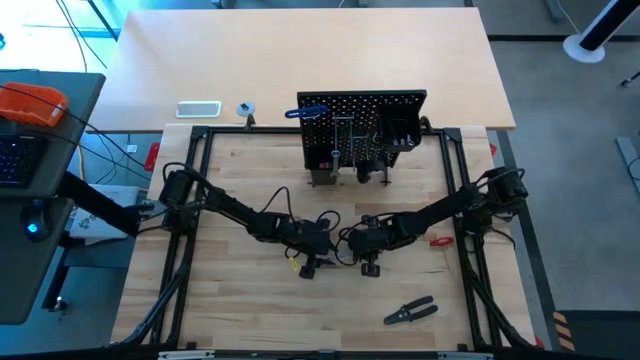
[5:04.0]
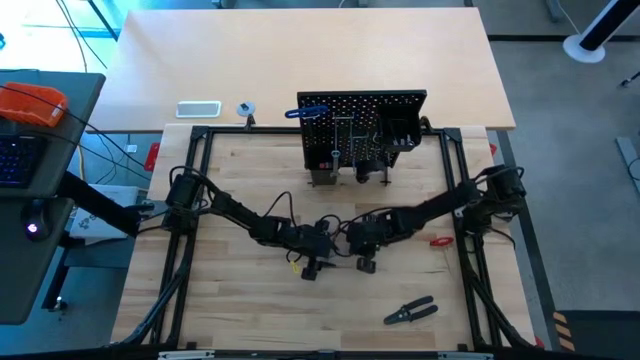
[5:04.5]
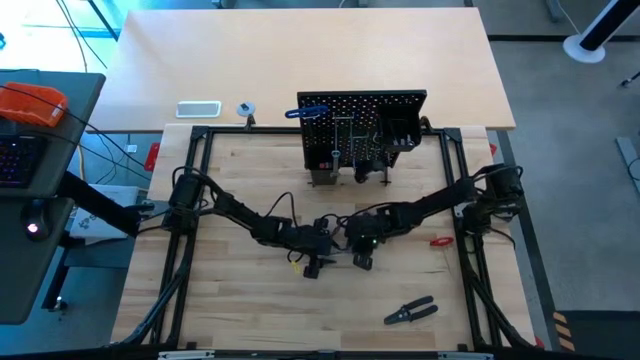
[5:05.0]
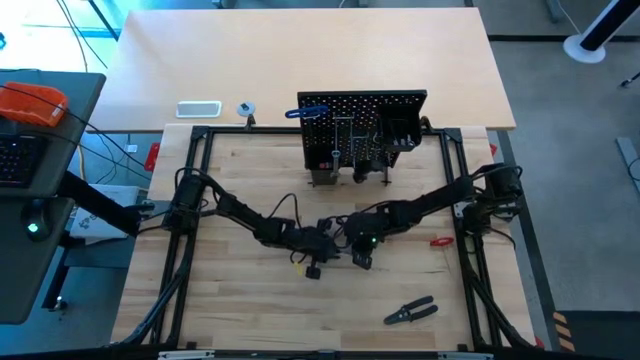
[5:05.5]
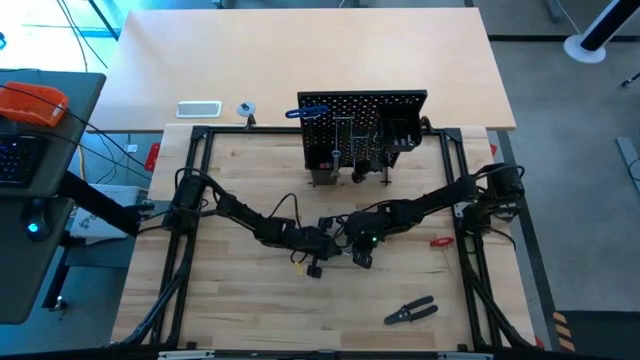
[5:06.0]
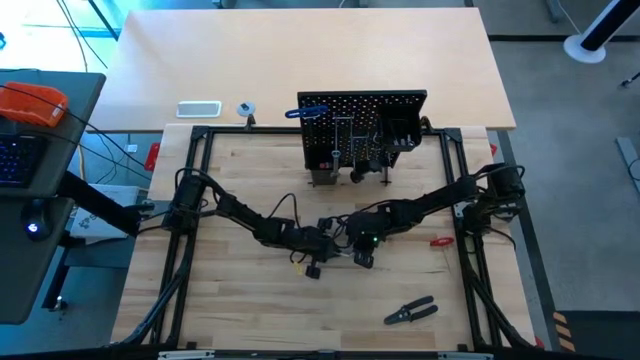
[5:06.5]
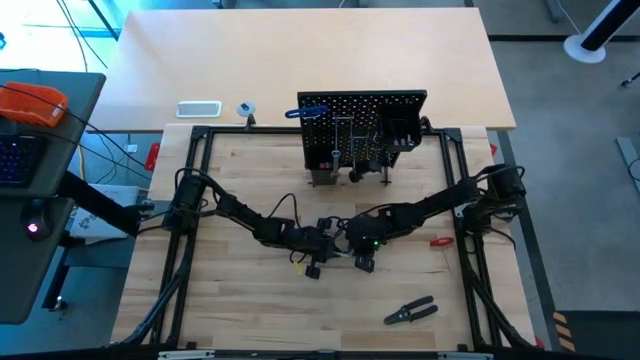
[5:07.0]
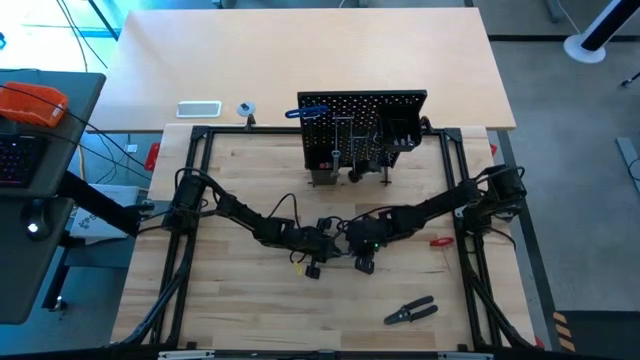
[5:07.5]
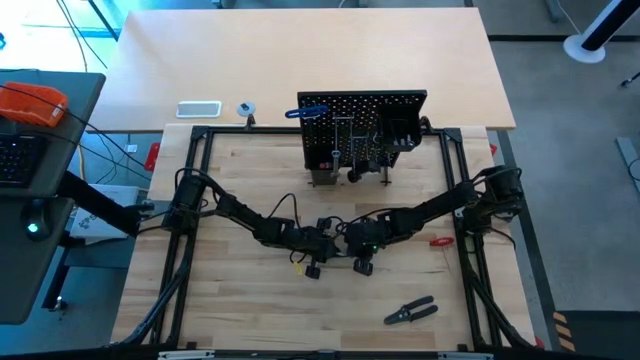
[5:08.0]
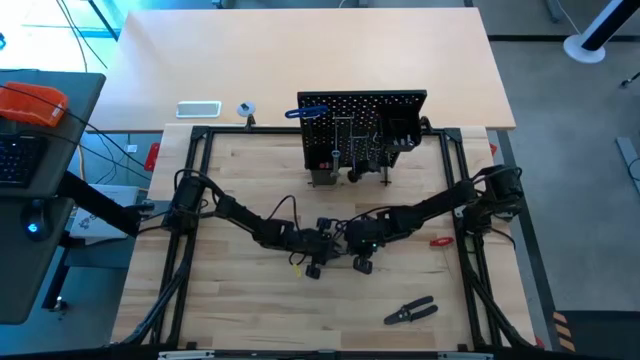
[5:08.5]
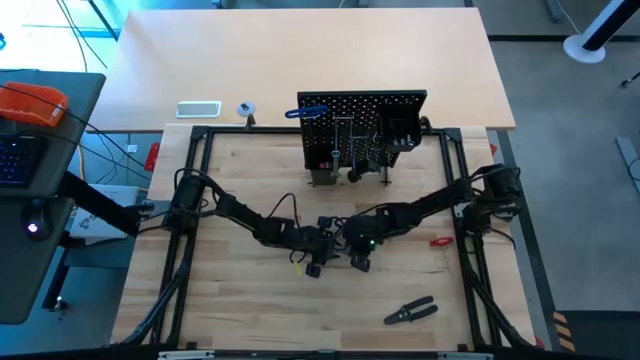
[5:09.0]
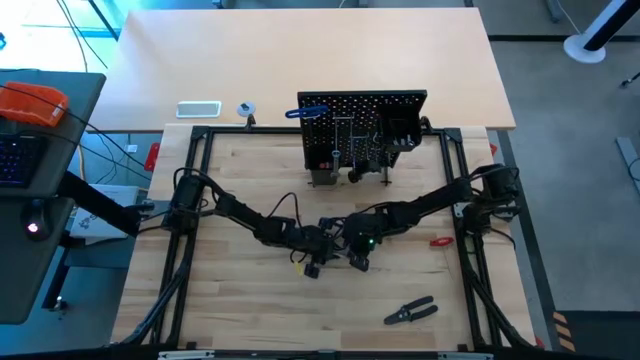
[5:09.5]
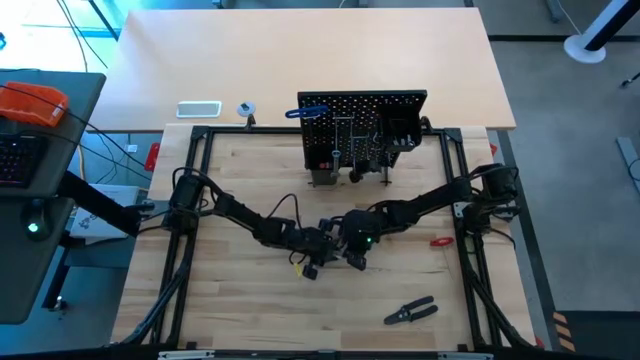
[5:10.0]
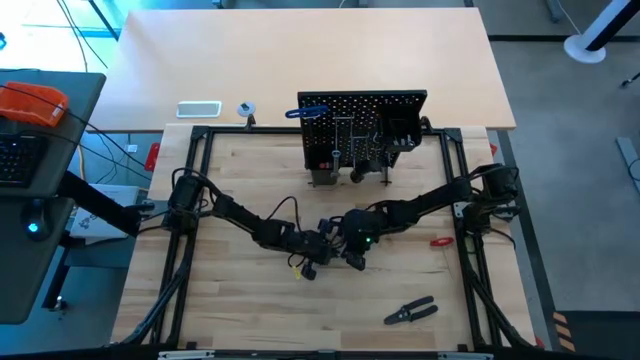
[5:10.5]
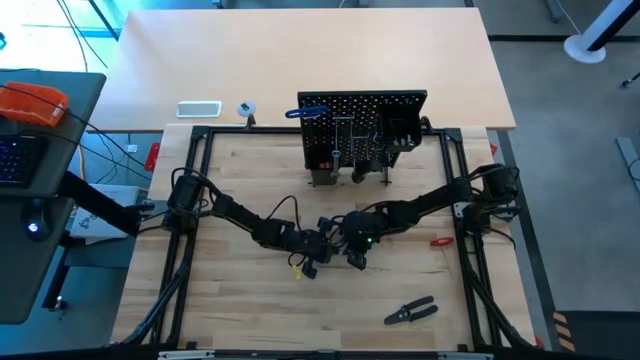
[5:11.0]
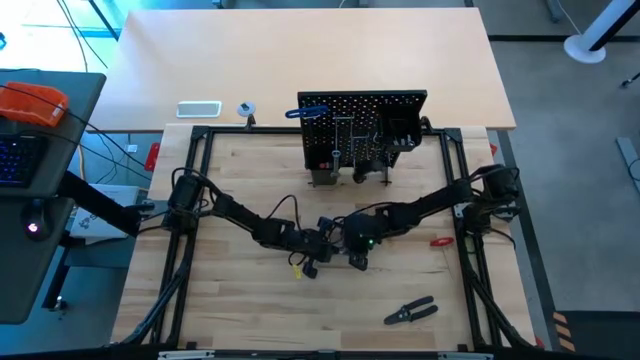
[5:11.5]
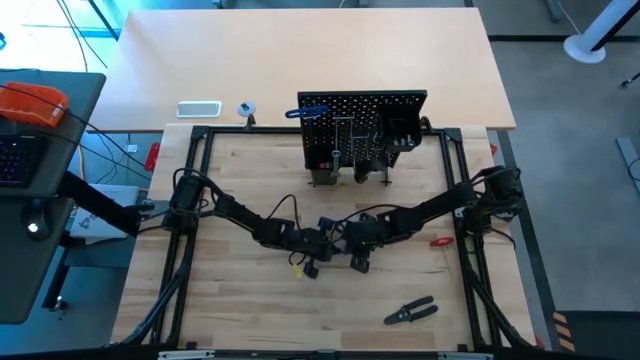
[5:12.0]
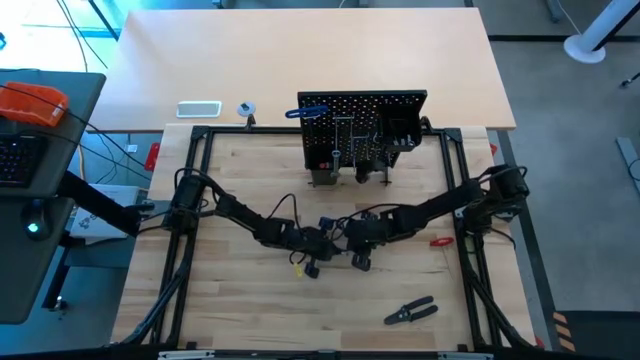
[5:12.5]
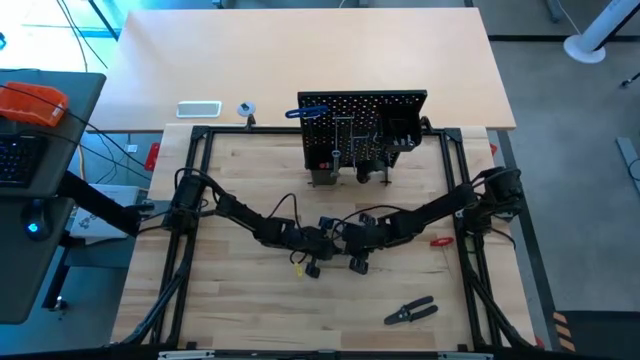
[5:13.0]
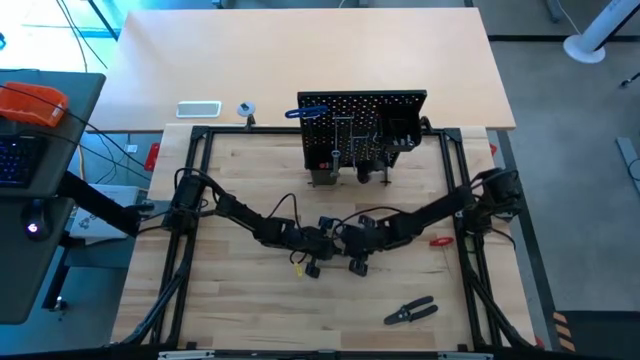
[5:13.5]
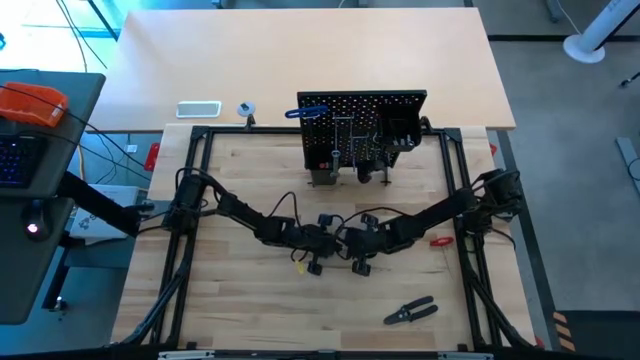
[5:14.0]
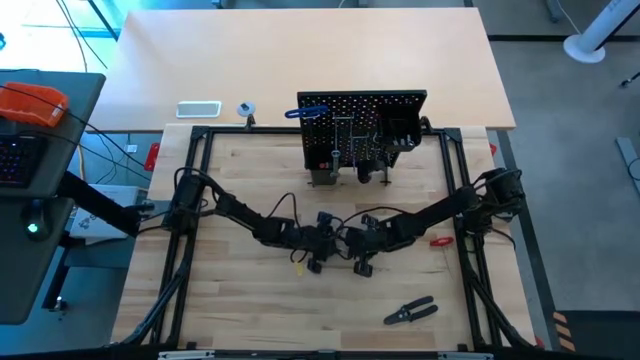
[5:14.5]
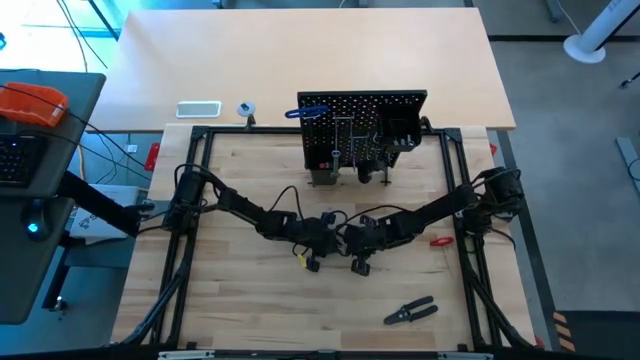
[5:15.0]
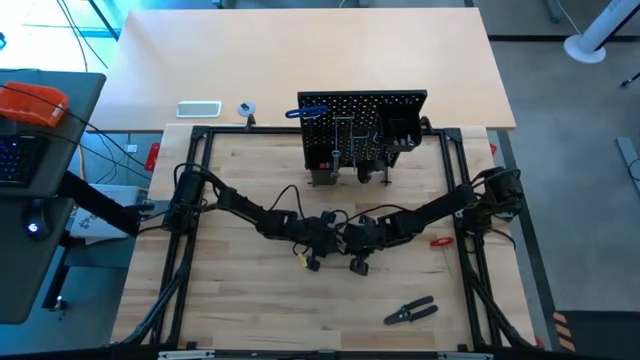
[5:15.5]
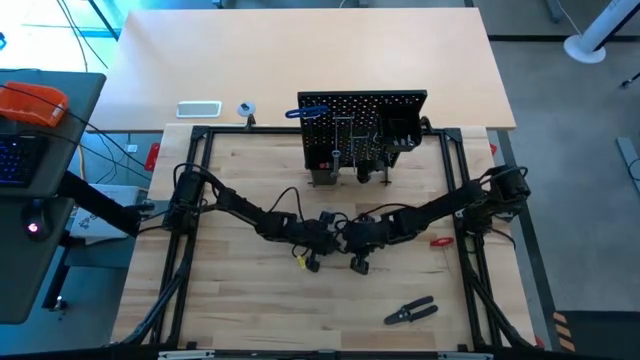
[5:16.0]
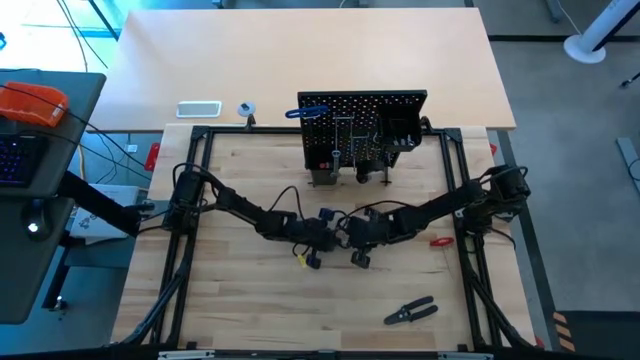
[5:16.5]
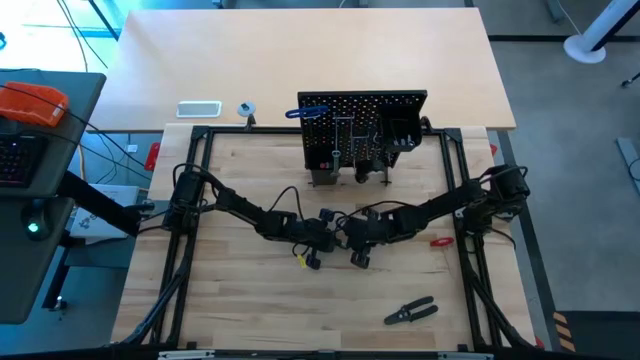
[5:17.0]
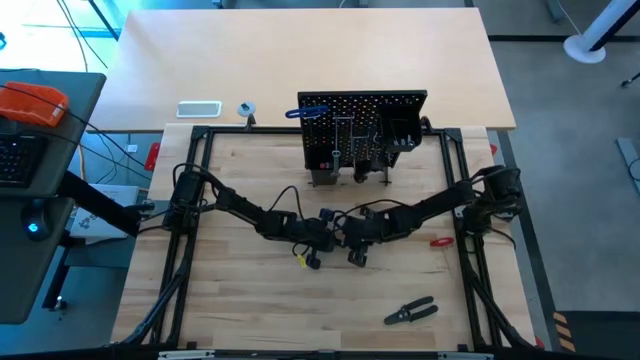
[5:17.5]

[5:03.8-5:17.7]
Task: Hang tools onto peg board
Hang the wrench on the pegboard

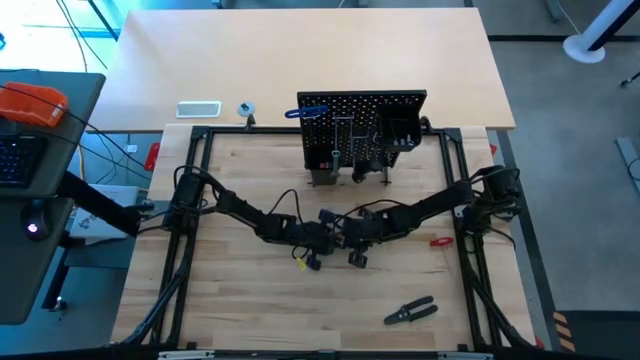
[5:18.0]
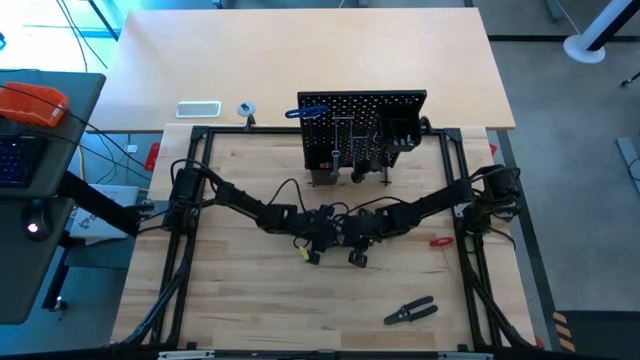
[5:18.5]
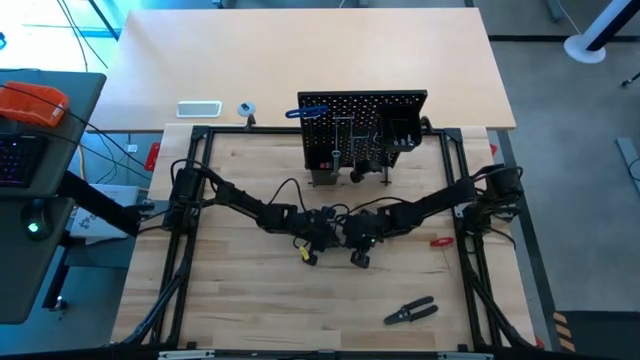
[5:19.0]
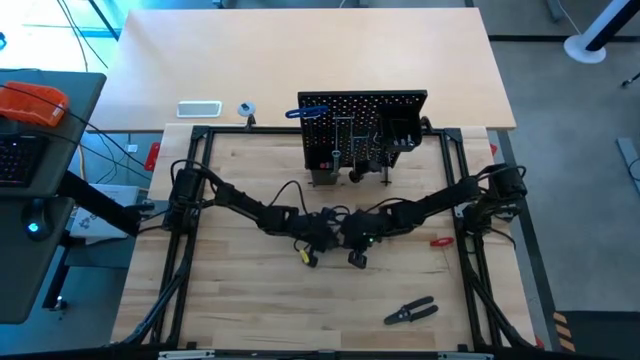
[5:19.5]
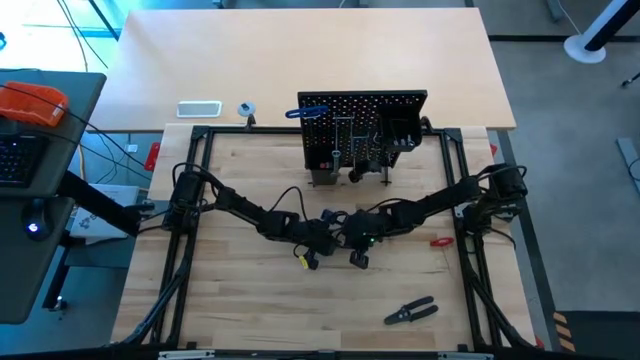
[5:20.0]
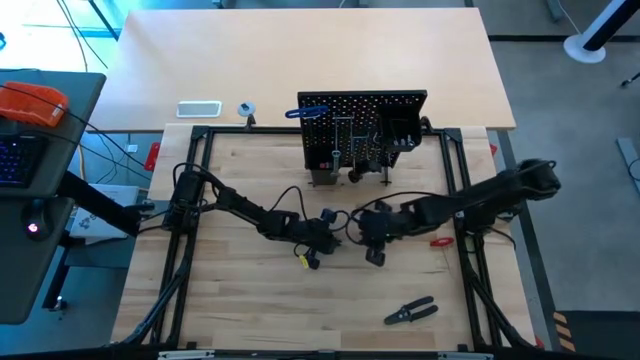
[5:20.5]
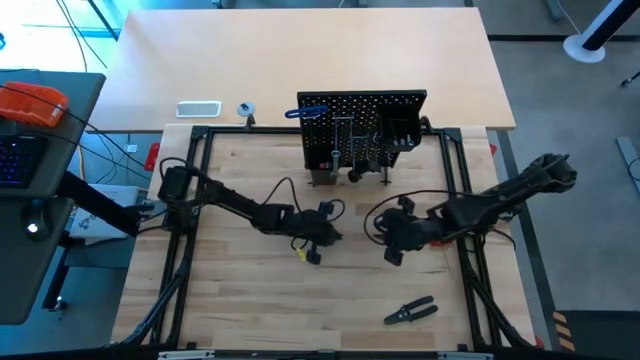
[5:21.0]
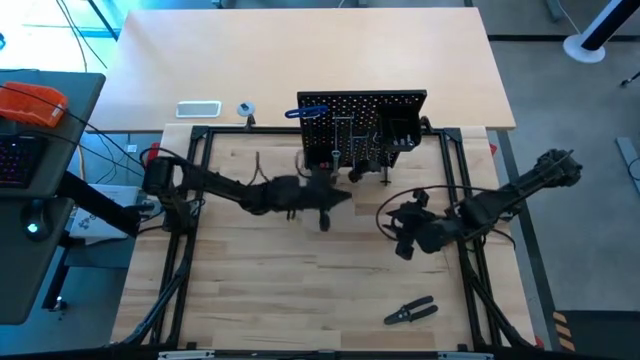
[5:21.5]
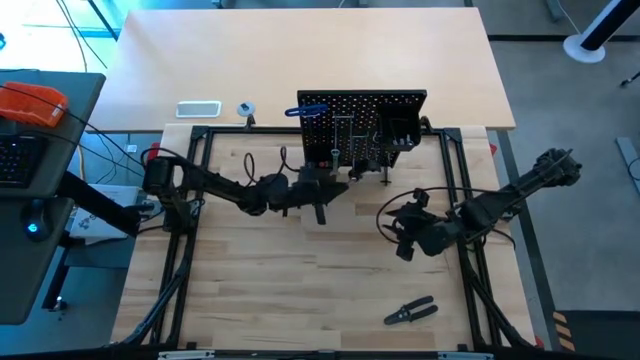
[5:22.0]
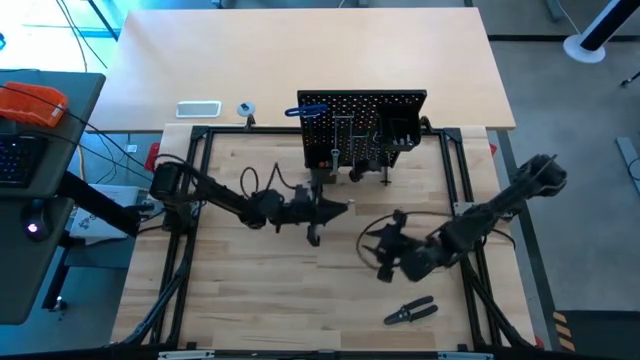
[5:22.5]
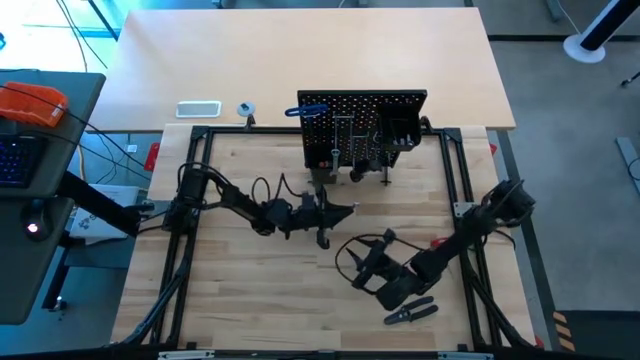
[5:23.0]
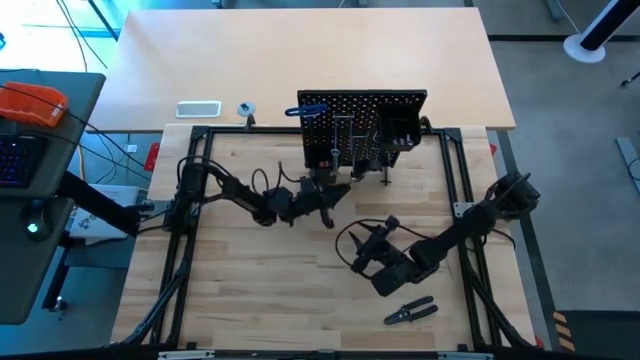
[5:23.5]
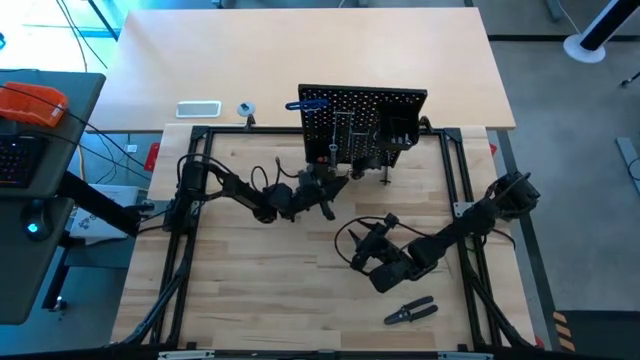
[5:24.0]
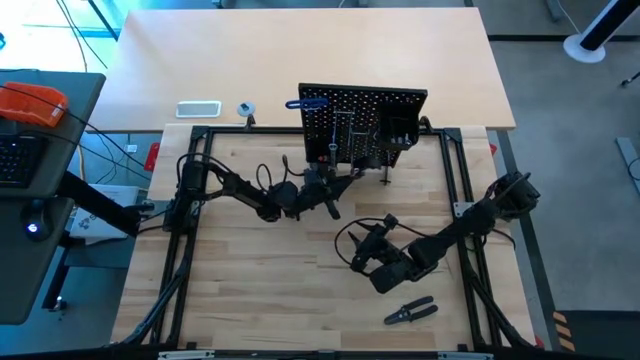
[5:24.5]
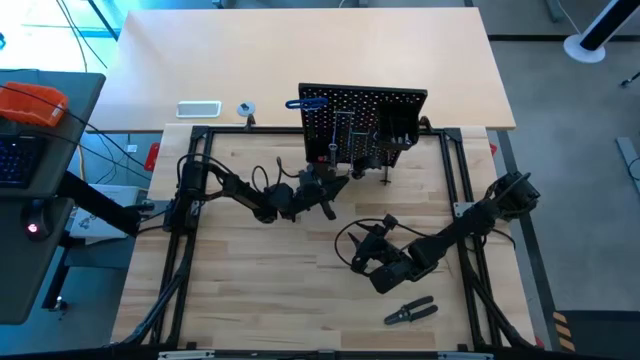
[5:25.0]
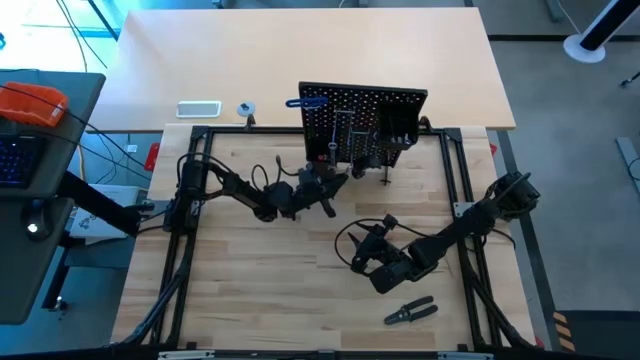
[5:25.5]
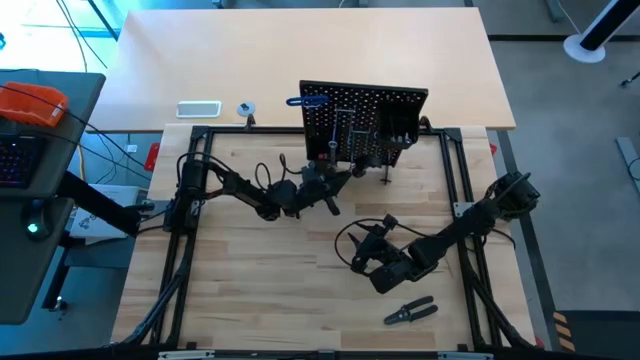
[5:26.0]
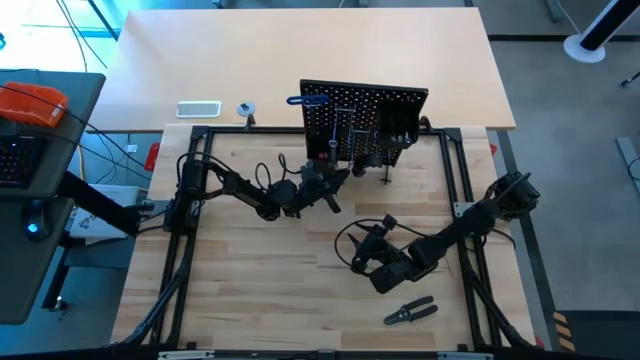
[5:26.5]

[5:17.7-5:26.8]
Hang the wrench on the pegboard
